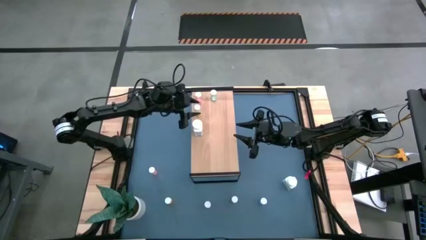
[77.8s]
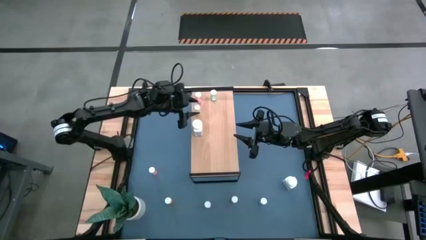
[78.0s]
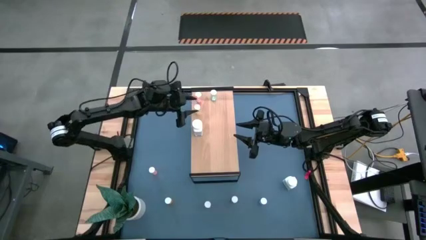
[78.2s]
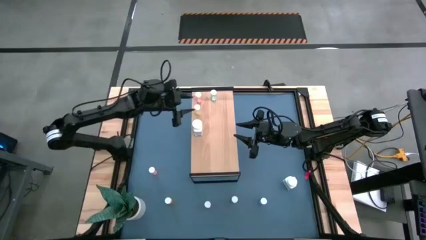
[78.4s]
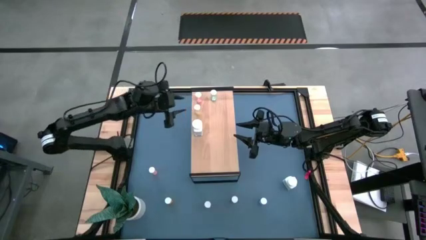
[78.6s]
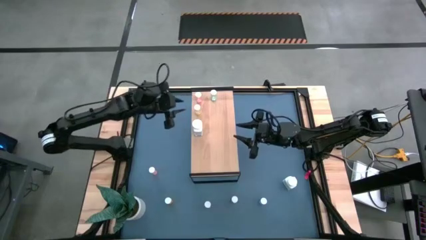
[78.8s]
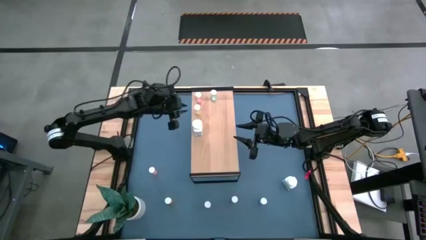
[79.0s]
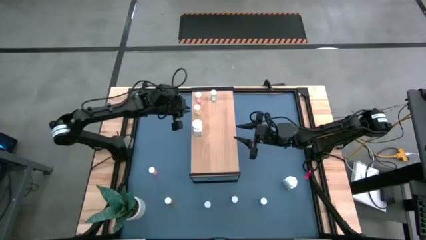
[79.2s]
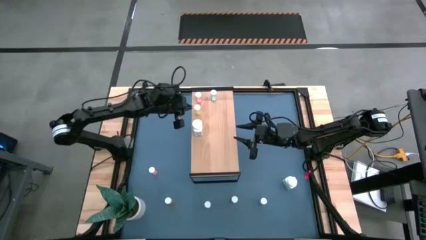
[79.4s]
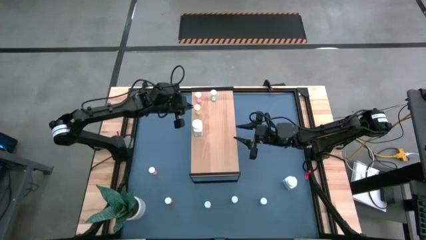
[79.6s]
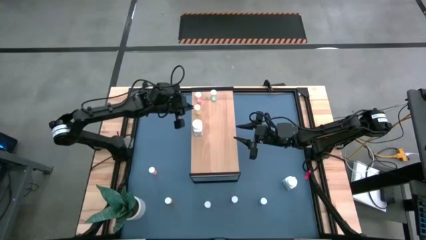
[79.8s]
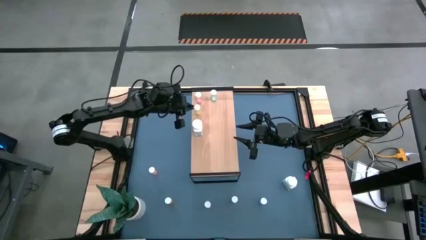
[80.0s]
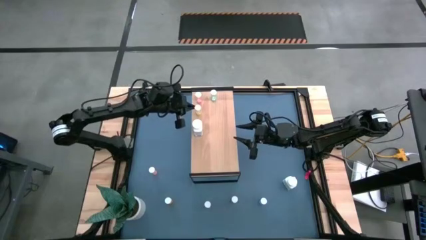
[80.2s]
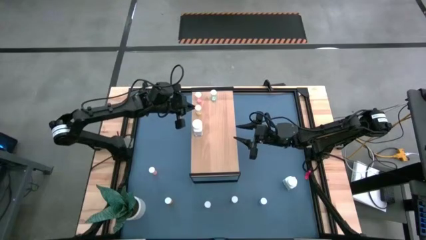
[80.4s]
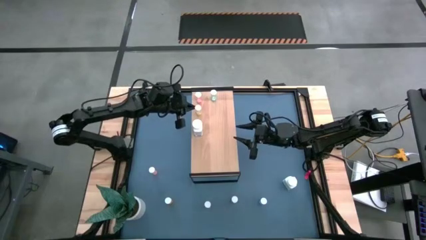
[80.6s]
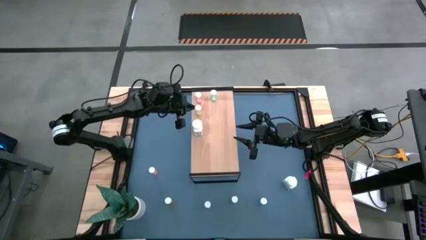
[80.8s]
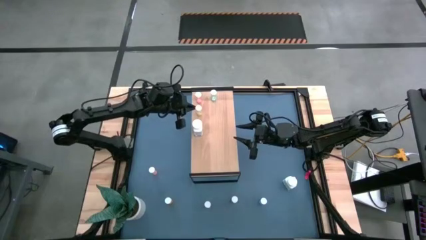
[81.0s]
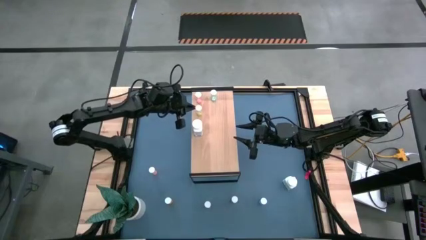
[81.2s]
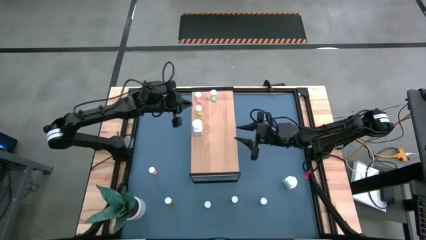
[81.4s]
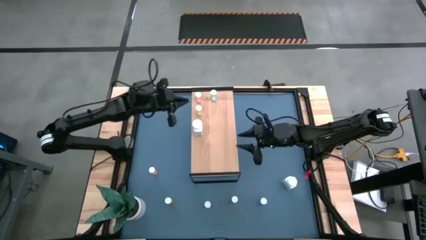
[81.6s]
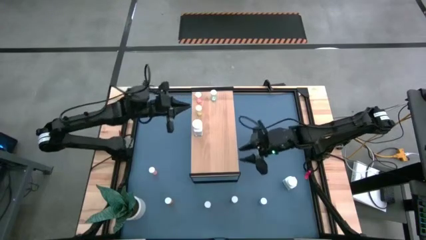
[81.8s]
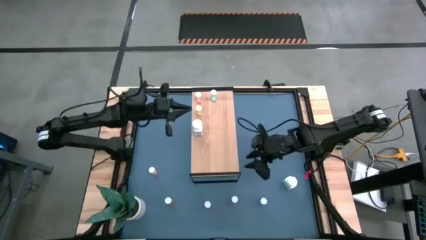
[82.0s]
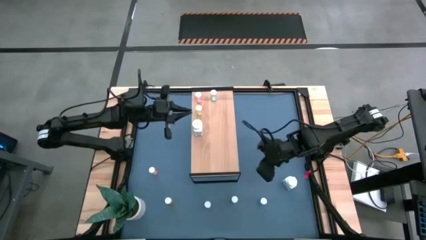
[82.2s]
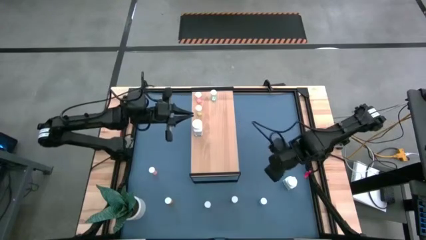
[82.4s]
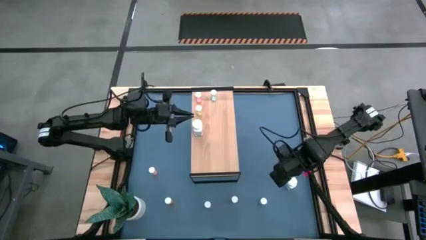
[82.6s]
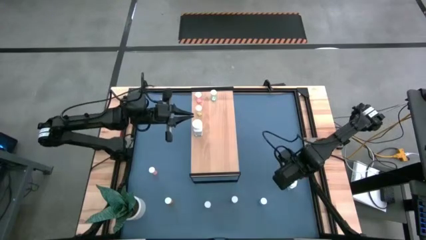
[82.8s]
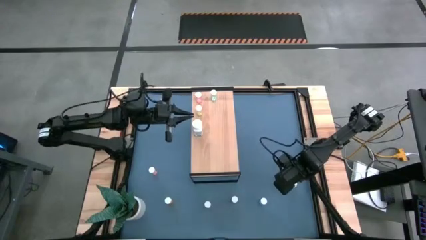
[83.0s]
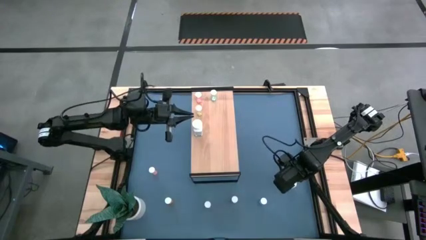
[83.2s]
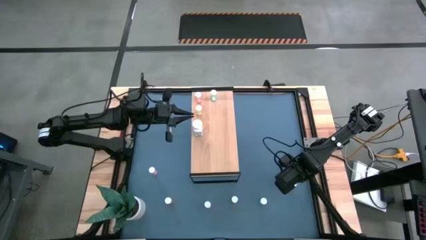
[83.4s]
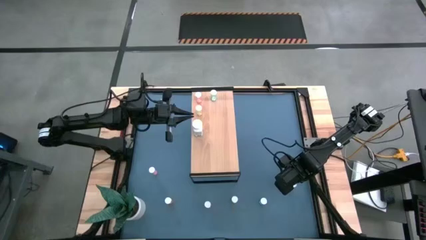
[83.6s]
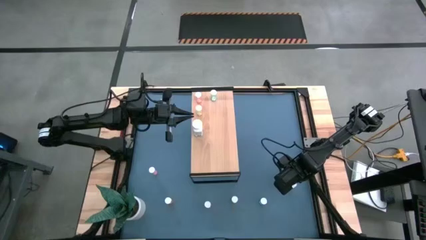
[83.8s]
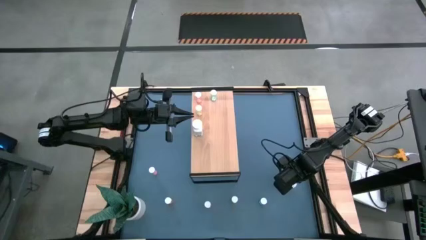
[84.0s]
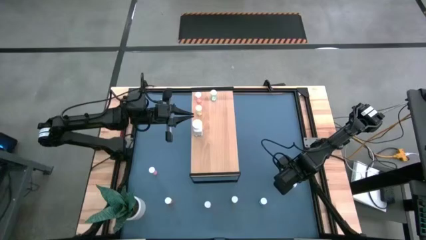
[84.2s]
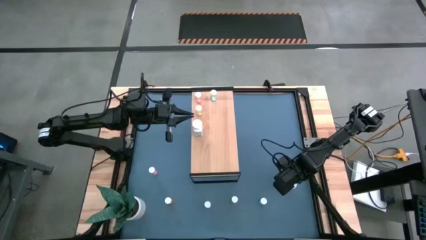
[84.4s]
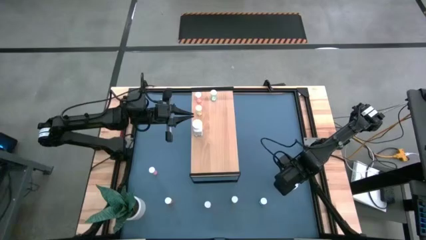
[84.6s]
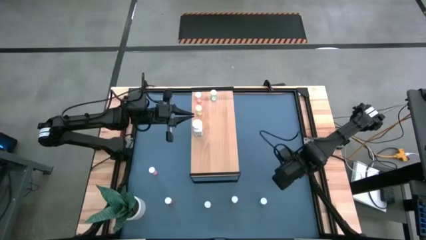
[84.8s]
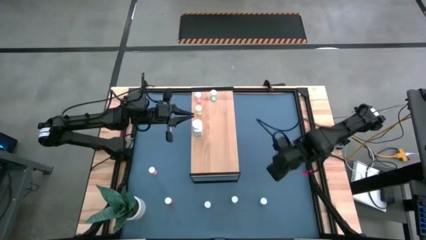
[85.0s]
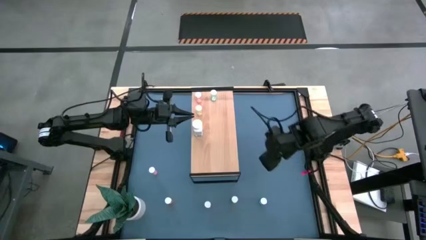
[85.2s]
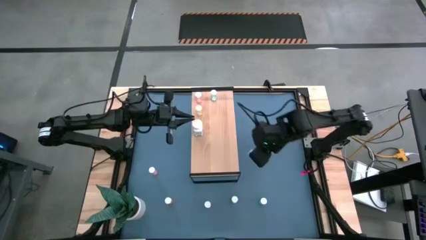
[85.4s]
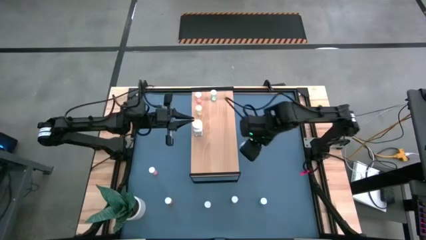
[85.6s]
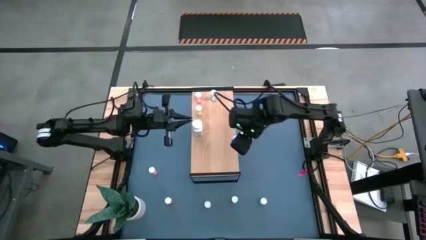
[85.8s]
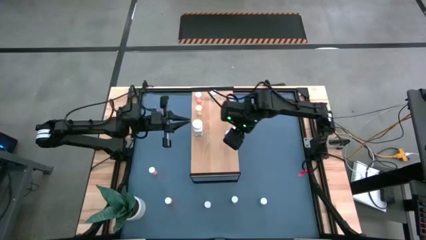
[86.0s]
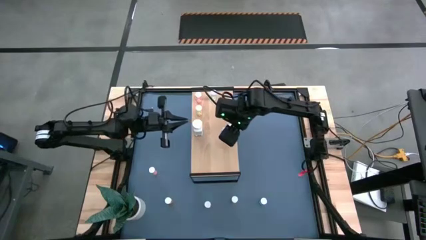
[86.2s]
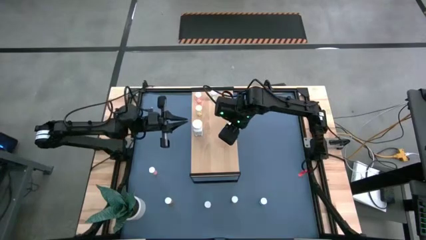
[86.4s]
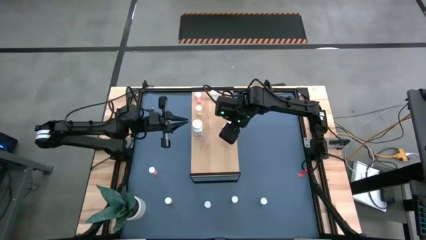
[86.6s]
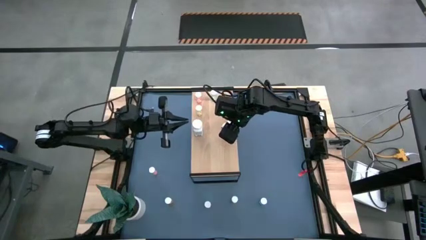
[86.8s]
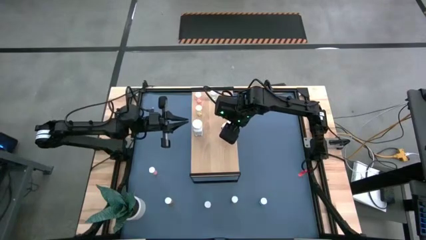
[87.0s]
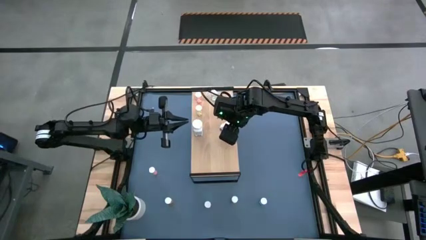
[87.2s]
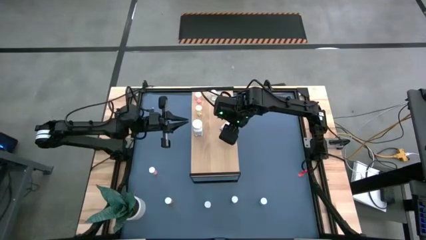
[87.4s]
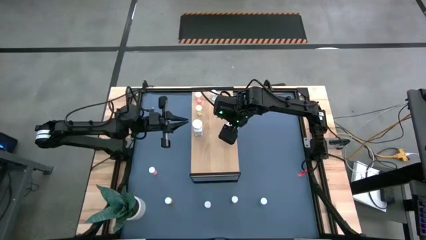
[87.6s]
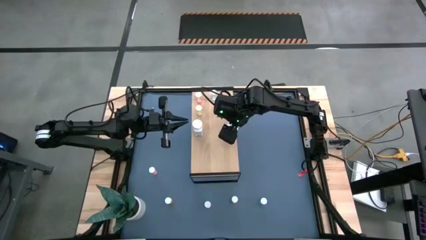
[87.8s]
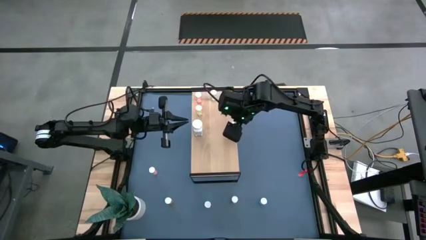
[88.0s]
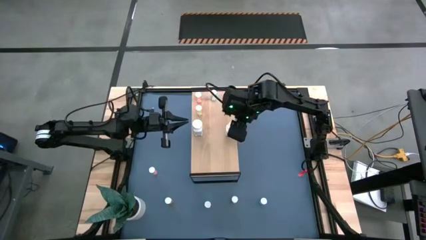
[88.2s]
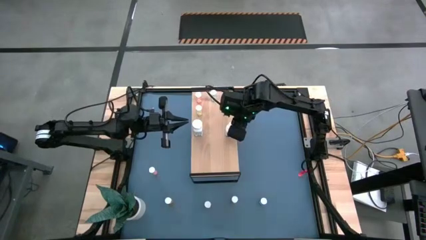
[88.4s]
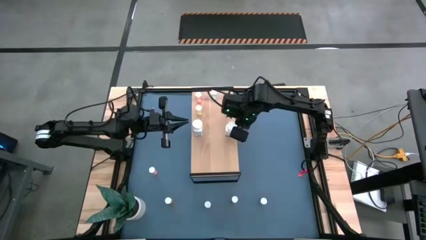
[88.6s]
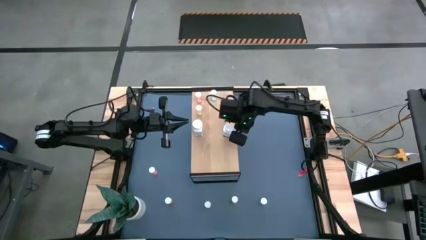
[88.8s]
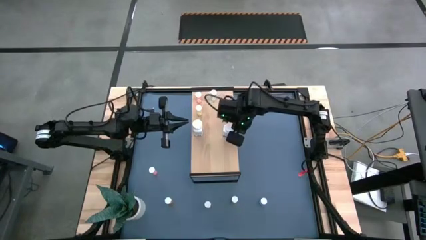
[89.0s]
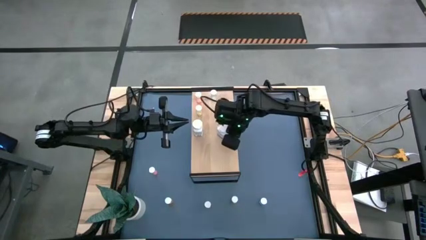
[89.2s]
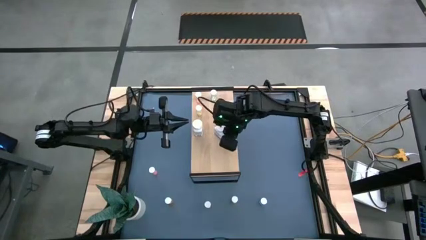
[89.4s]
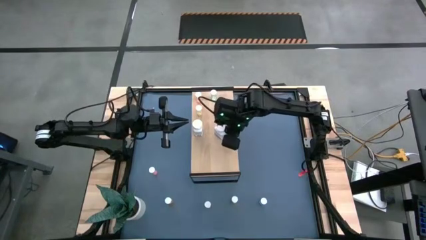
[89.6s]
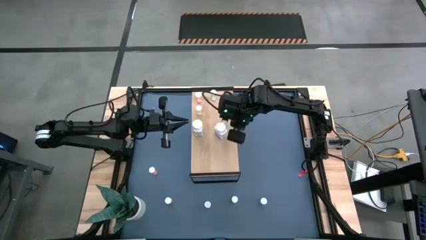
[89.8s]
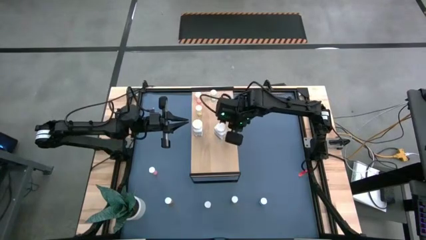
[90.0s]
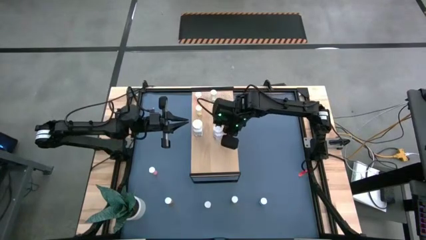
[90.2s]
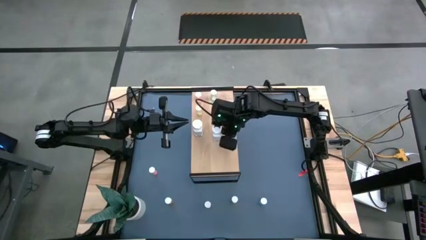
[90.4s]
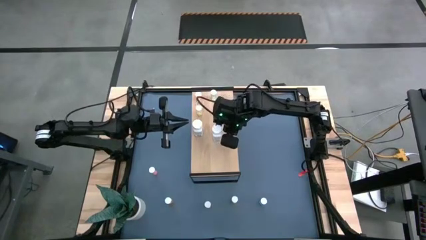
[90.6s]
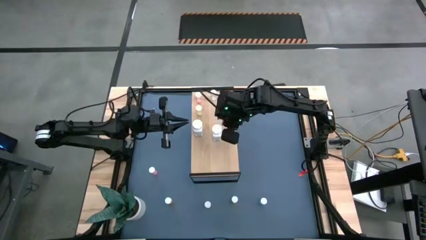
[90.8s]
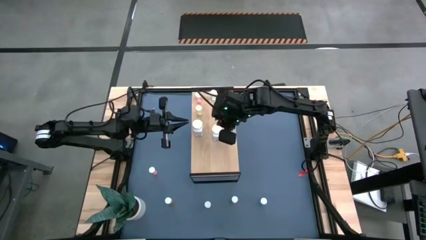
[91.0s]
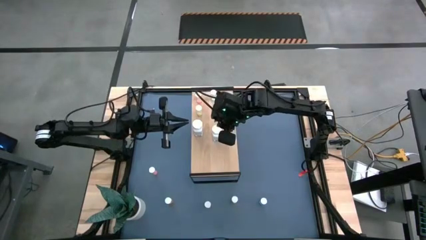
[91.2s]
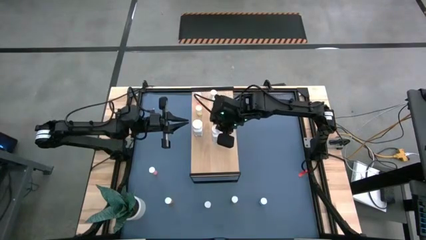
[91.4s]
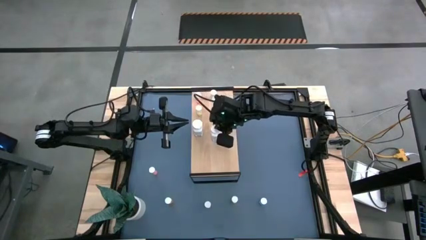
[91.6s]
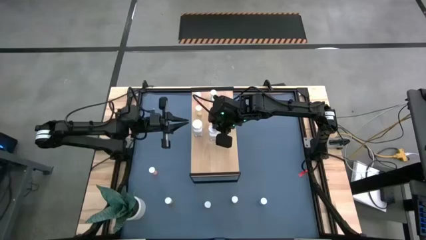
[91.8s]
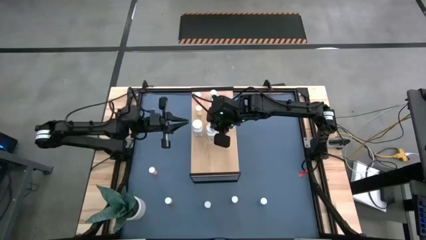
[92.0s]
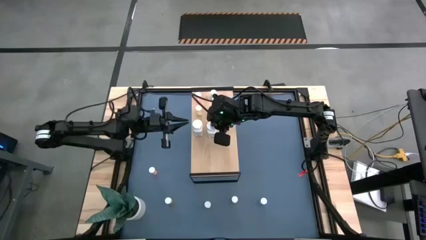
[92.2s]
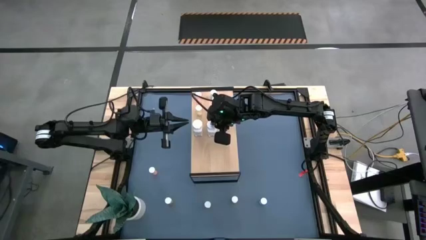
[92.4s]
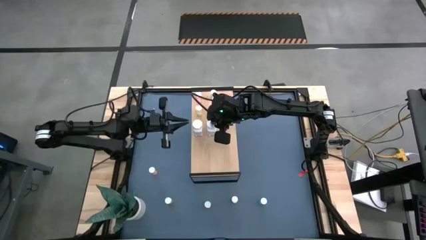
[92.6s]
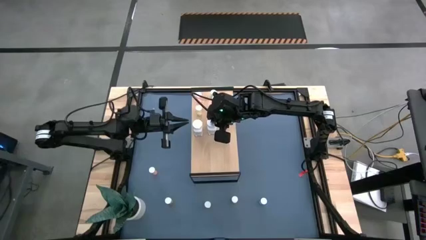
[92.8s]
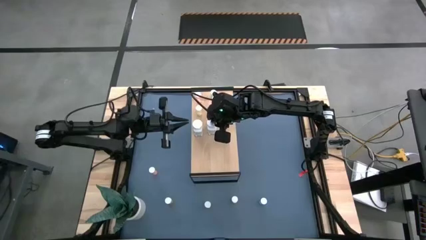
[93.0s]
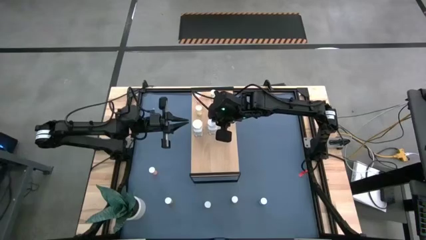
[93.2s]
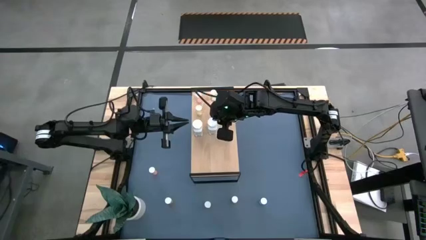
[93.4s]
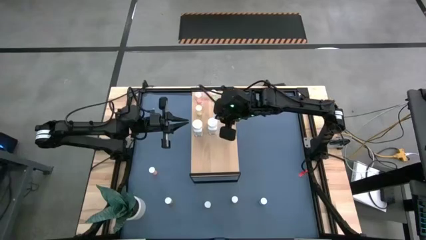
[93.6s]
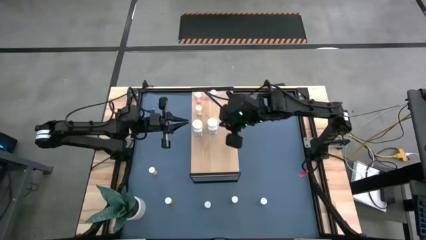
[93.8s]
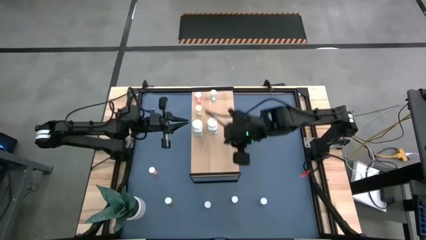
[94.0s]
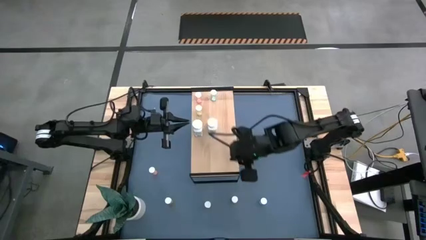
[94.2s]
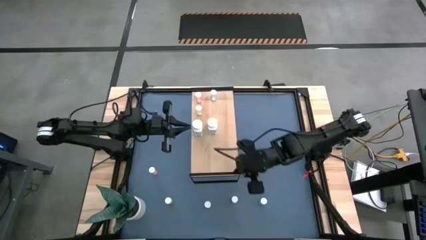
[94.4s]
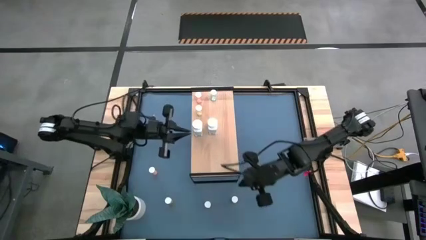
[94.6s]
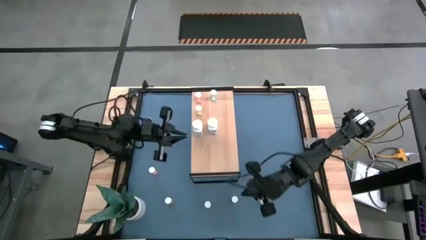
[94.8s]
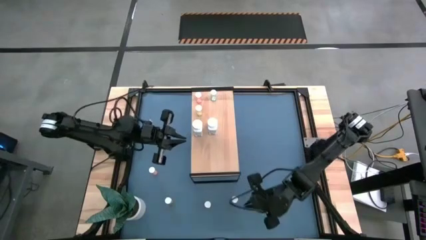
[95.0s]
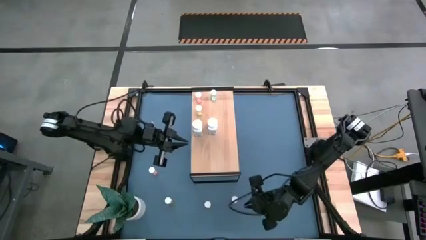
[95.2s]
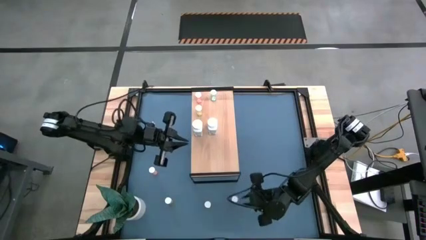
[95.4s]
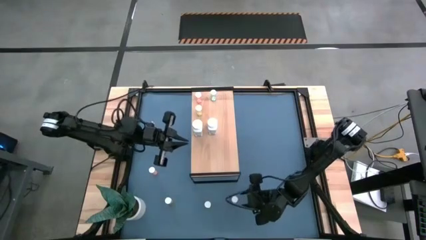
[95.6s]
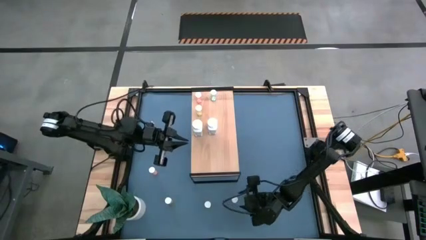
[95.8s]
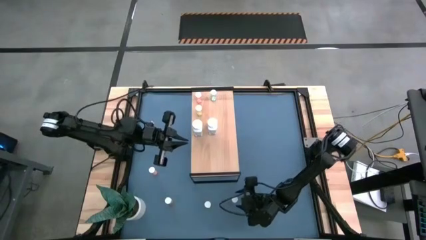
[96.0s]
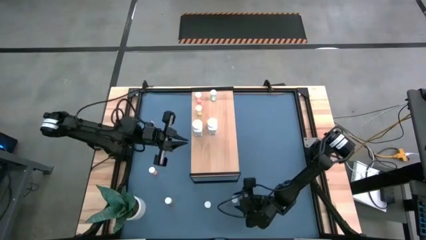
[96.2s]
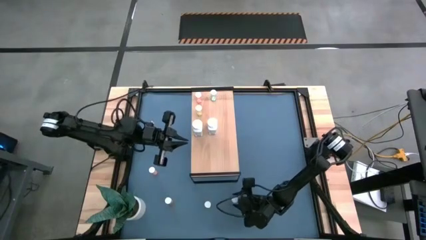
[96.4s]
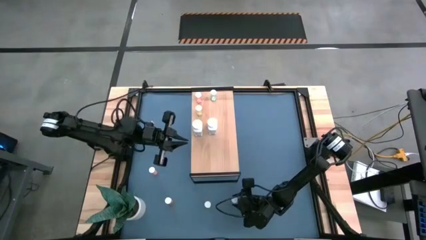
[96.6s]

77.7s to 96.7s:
Task: Pick and place medicine bottles onto shelf by color
Put the white medicine bottle on the shelf aligned with the white pill bottle
